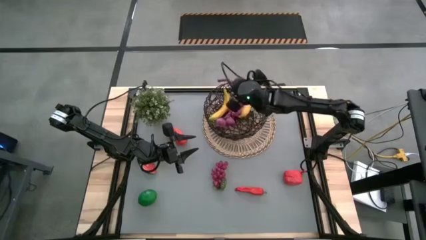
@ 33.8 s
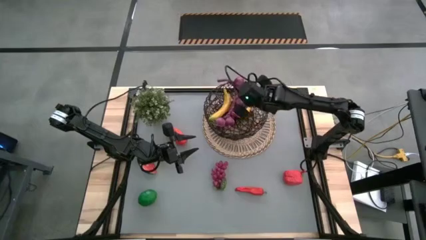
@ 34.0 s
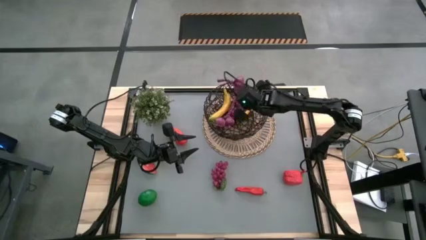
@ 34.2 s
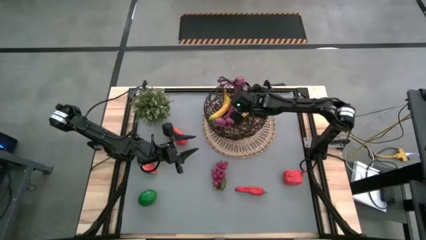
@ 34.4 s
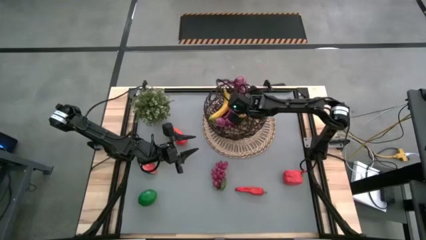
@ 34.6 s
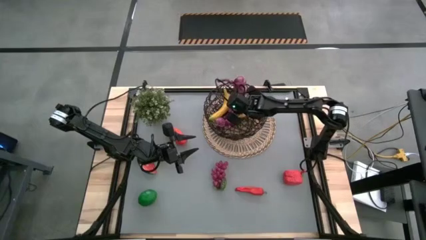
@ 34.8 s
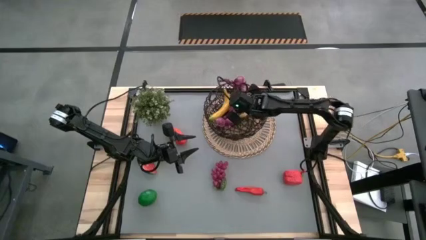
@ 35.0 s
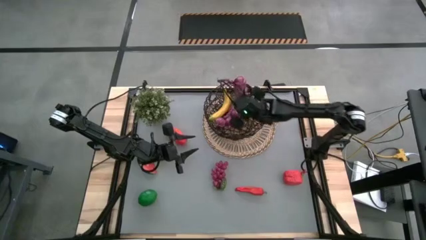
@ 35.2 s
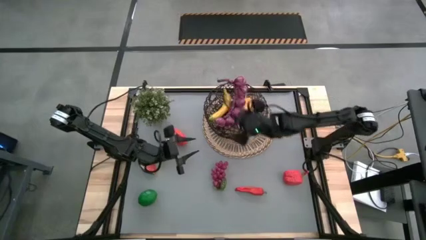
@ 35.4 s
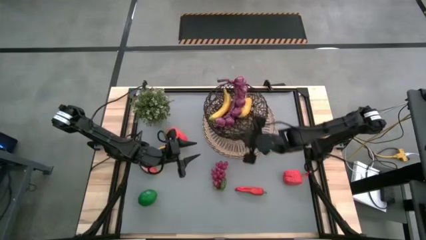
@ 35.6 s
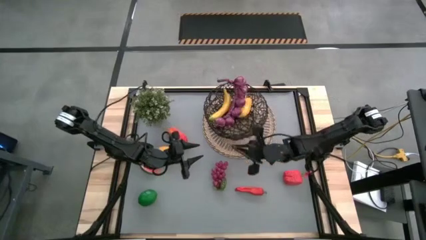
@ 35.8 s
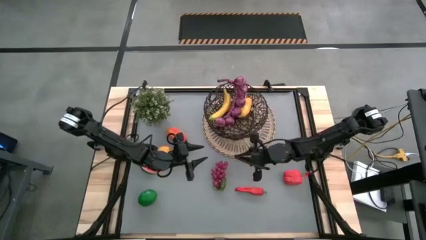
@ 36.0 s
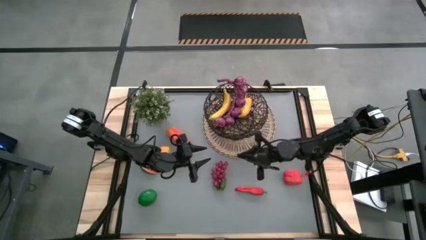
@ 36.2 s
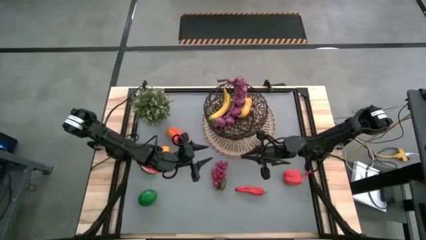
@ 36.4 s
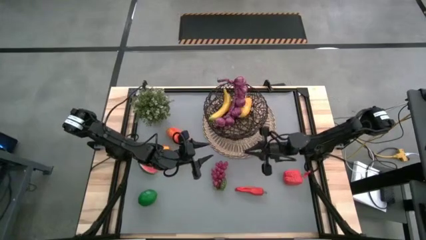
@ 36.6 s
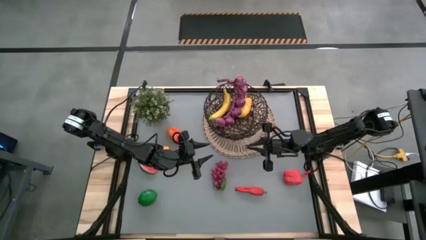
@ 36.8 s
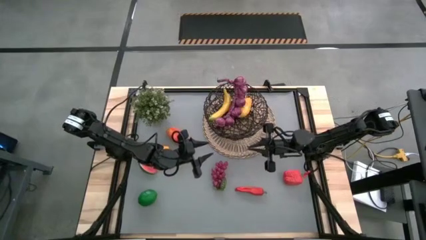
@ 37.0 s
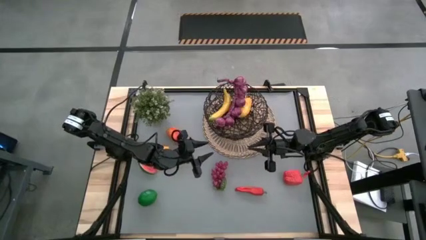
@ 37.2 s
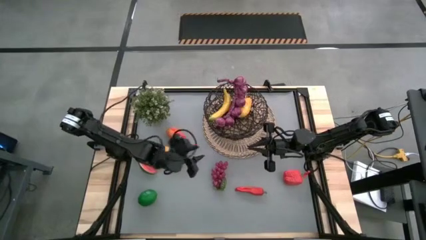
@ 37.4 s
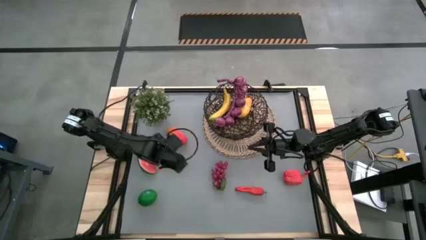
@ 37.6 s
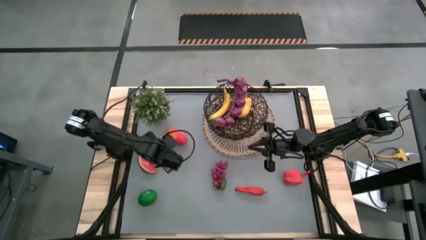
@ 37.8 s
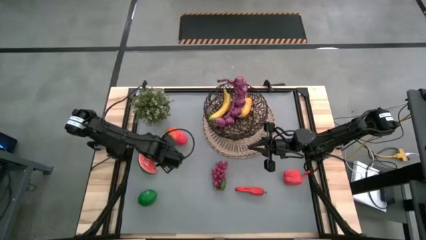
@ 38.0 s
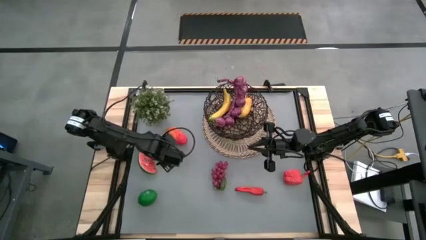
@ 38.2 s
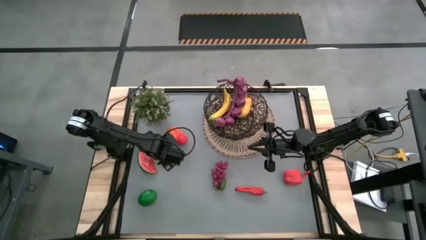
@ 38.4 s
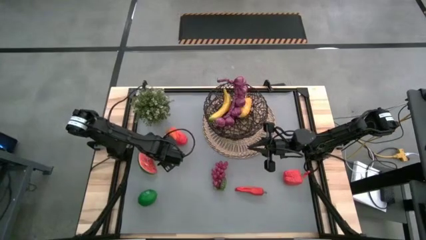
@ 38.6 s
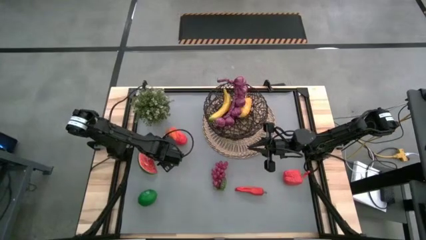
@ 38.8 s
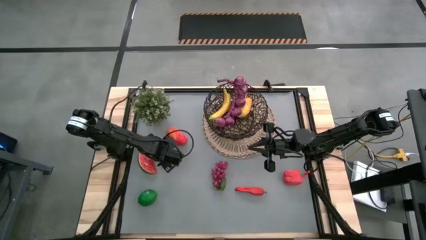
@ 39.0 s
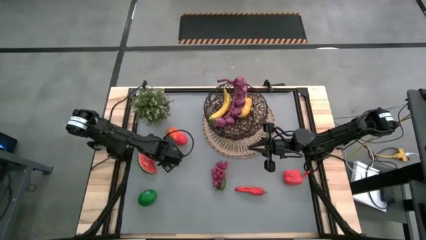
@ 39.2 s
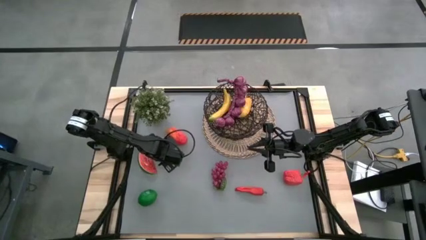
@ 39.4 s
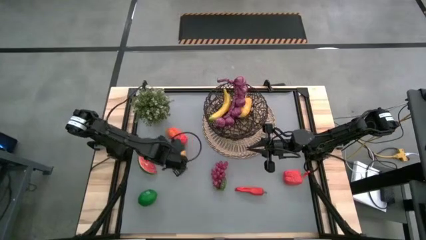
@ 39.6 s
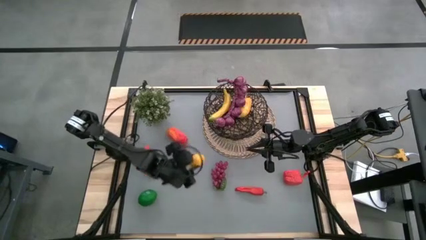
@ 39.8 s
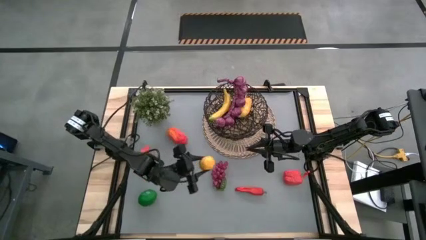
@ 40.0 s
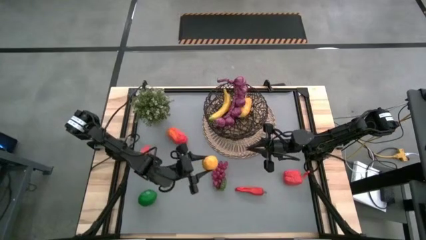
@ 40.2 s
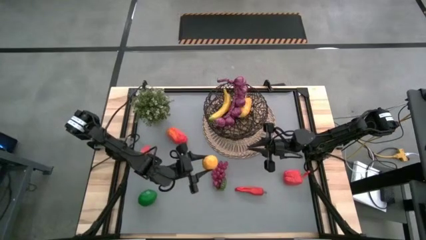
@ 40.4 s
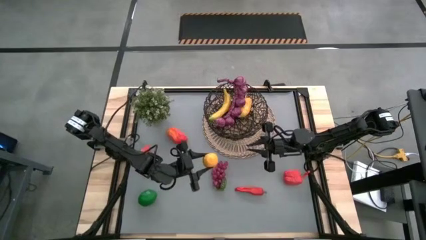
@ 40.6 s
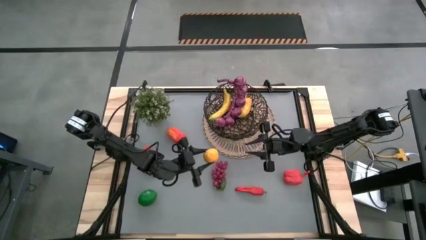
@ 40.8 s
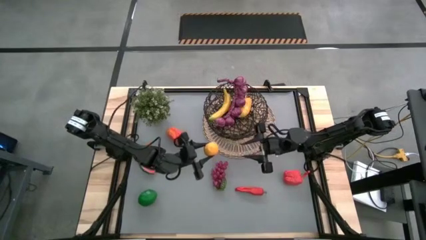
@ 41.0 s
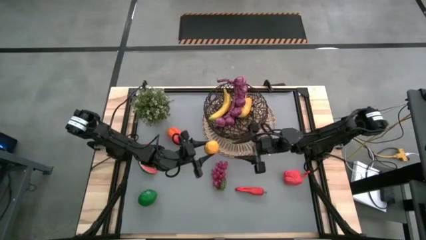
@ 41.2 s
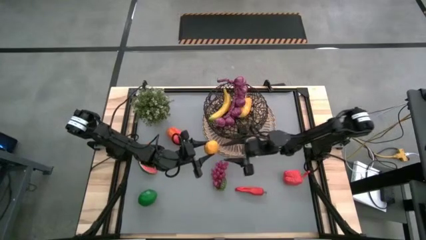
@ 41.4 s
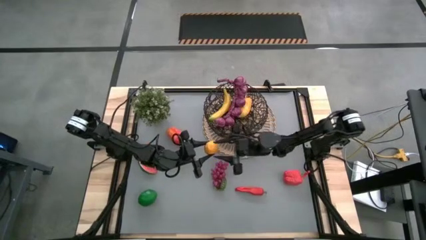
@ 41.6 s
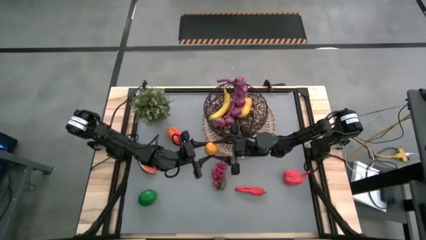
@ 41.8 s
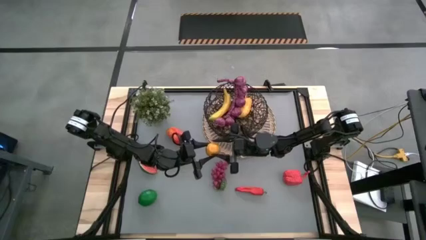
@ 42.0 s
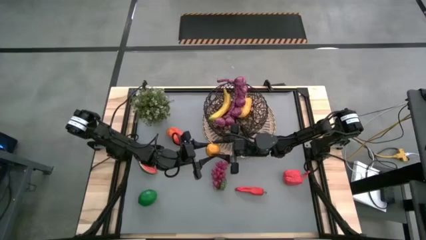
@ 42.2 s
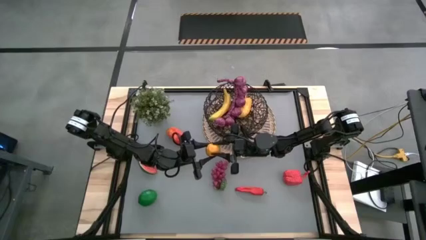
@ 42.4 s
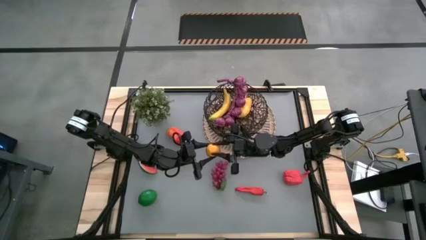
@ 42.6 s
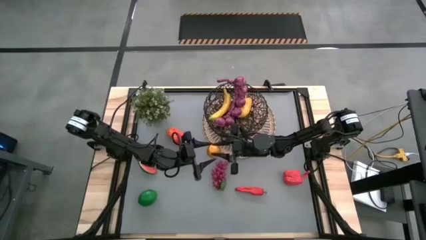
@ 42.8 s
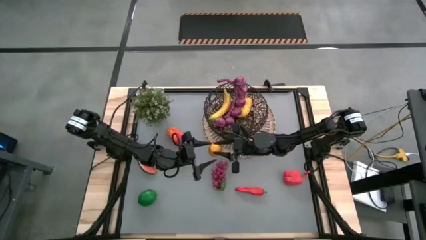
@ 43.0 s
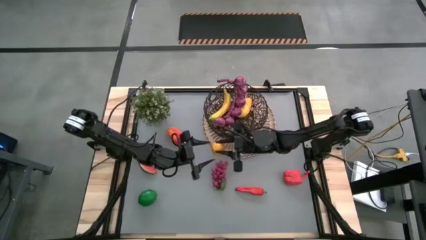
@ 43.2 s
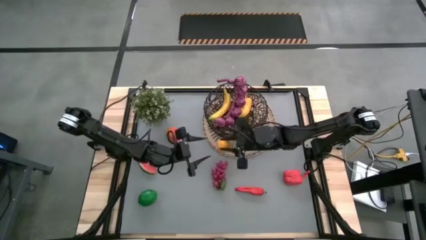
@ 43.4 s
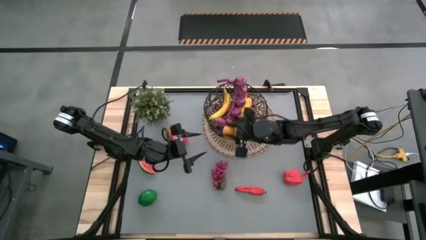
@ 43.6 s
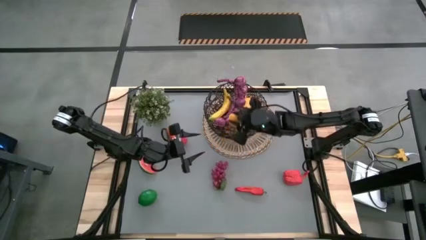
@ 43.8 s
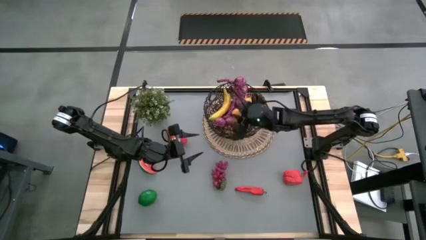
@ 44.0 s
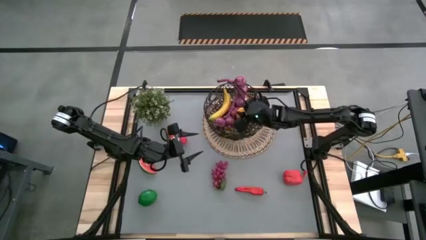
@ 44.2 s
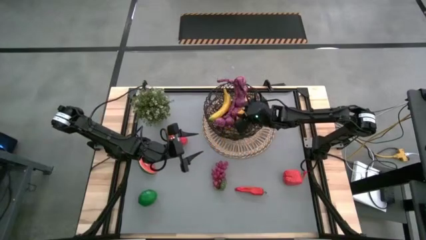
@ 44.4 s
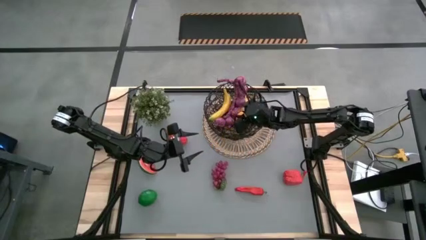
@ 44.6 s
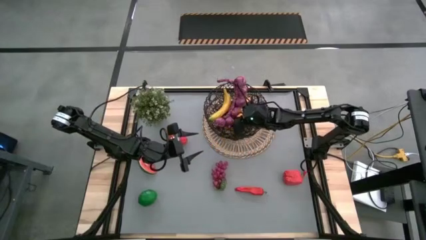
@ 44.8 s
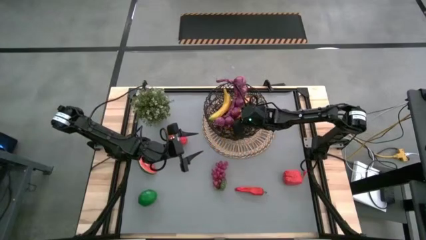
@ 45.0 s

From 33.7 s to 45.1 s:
Task: Build produce basket
Put the lemon into the black wire basket
